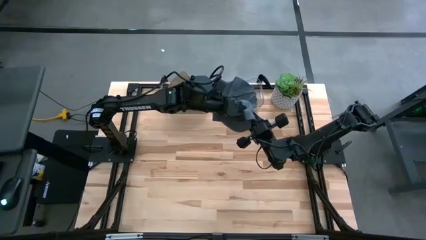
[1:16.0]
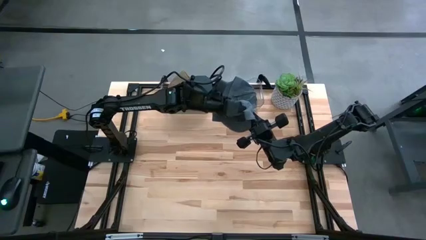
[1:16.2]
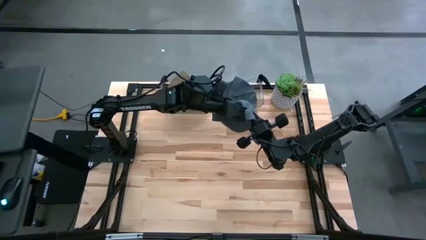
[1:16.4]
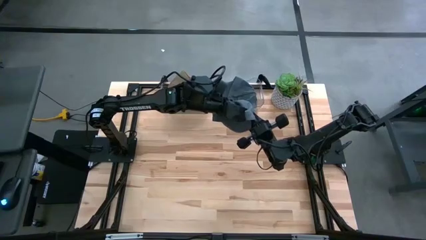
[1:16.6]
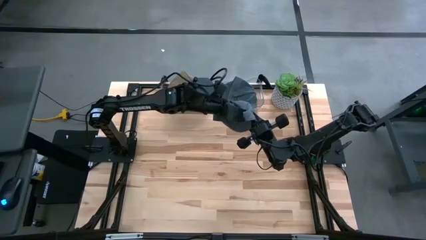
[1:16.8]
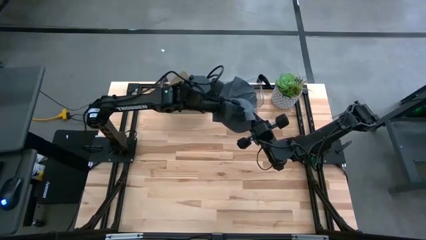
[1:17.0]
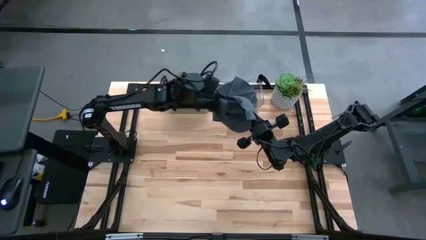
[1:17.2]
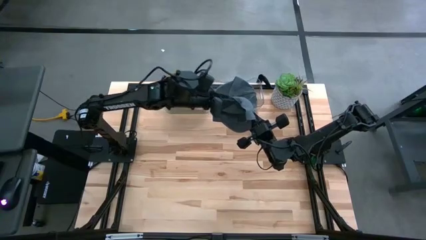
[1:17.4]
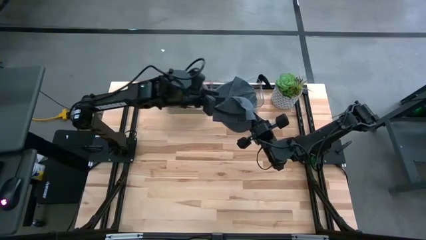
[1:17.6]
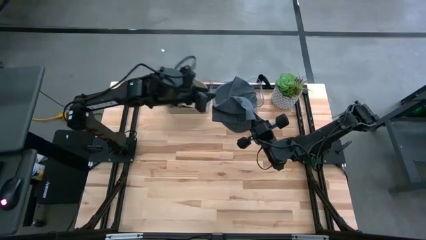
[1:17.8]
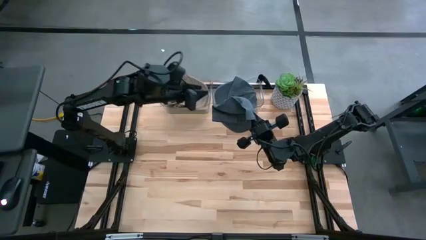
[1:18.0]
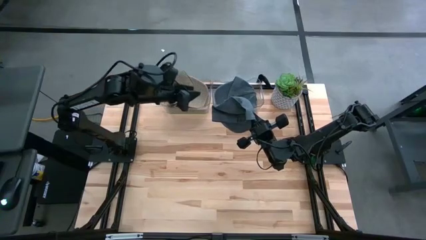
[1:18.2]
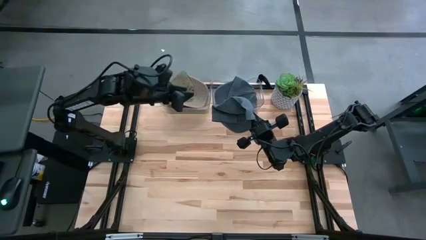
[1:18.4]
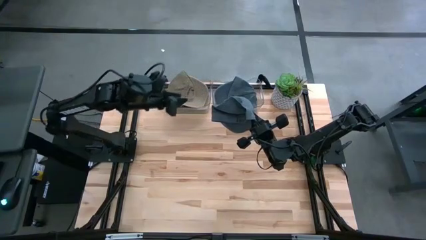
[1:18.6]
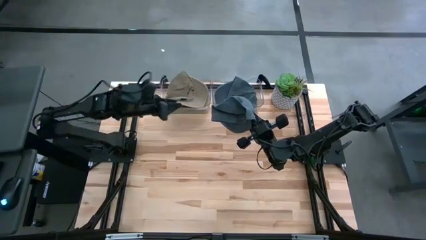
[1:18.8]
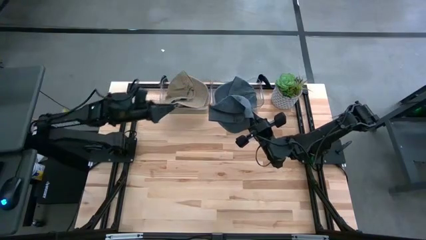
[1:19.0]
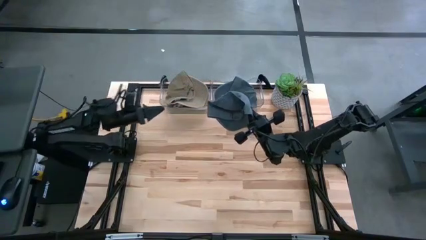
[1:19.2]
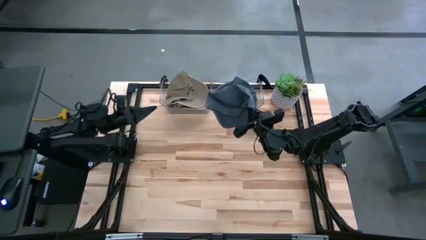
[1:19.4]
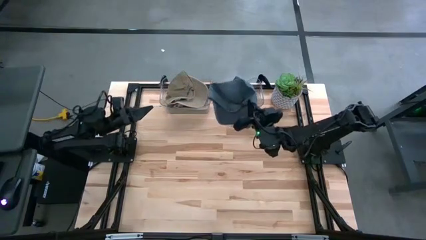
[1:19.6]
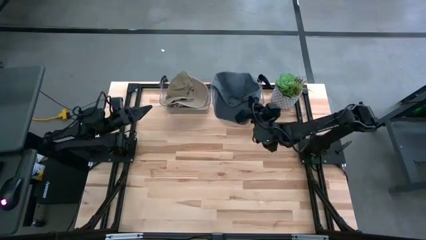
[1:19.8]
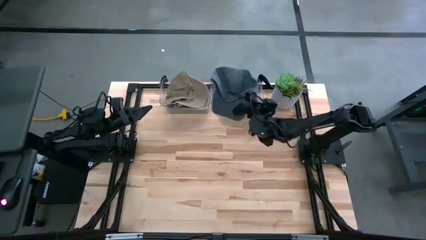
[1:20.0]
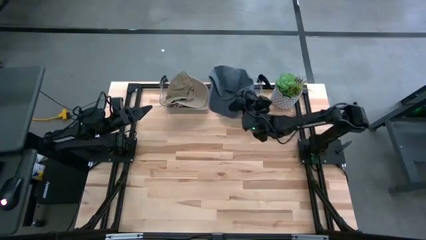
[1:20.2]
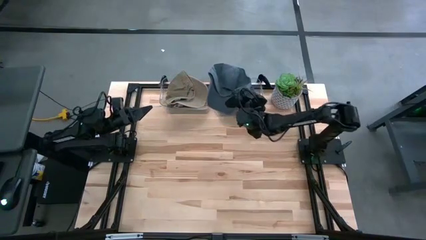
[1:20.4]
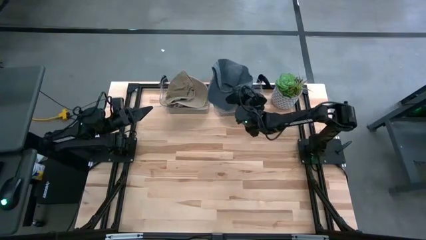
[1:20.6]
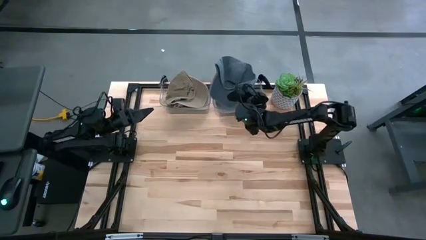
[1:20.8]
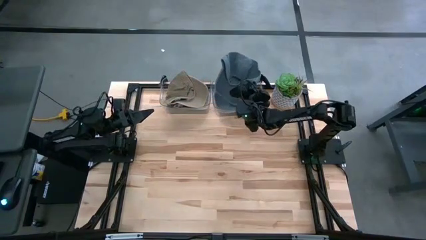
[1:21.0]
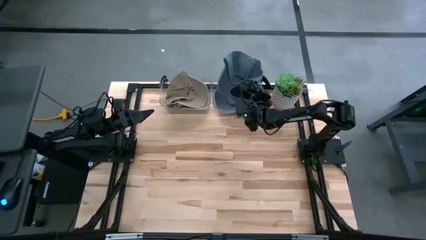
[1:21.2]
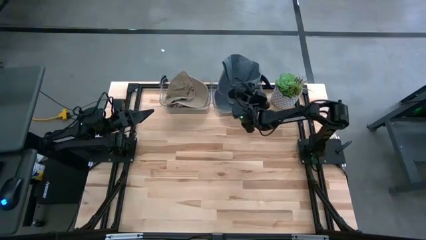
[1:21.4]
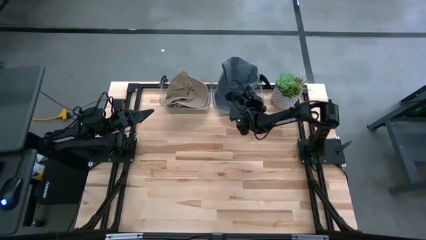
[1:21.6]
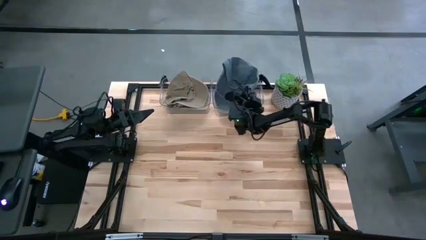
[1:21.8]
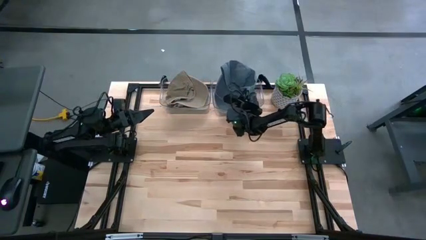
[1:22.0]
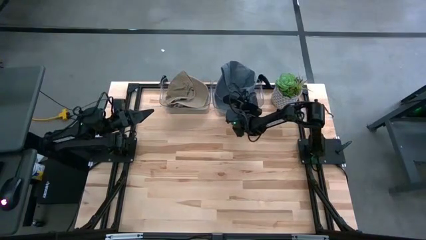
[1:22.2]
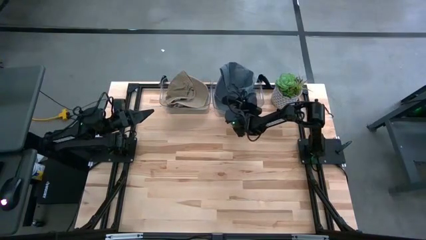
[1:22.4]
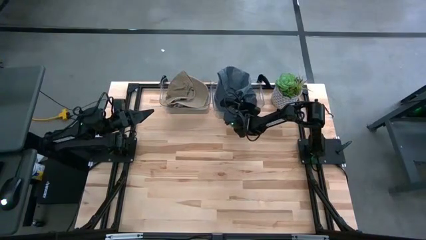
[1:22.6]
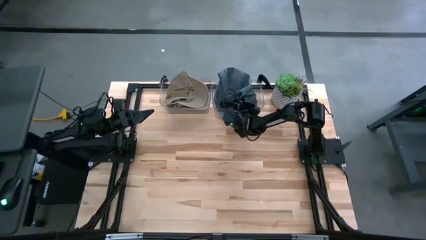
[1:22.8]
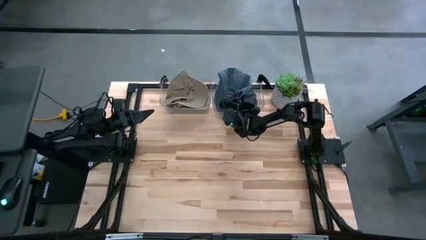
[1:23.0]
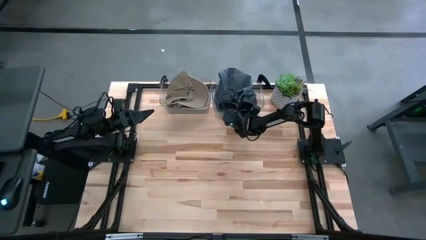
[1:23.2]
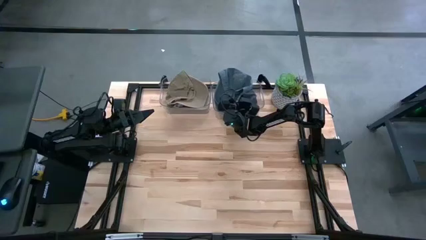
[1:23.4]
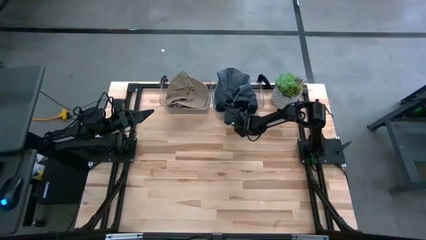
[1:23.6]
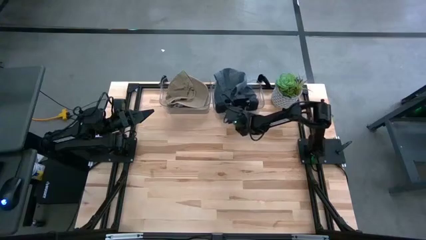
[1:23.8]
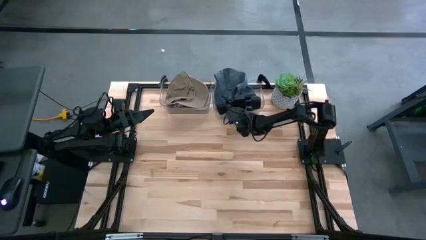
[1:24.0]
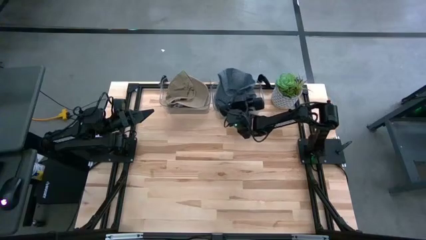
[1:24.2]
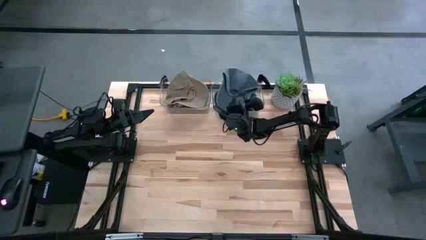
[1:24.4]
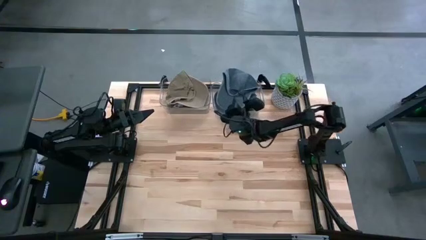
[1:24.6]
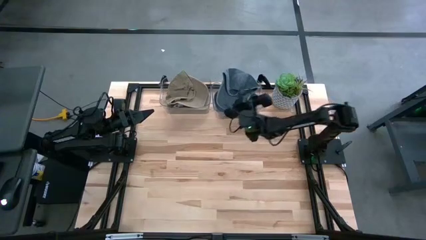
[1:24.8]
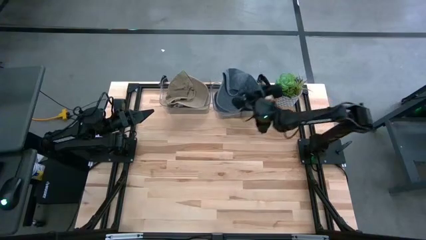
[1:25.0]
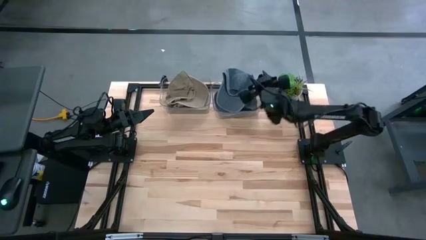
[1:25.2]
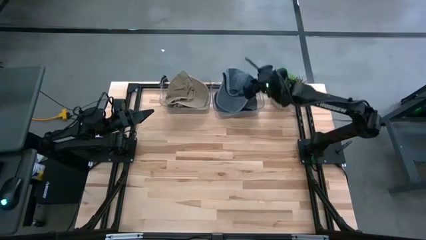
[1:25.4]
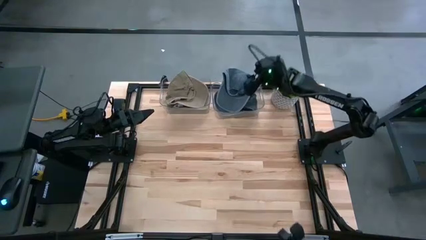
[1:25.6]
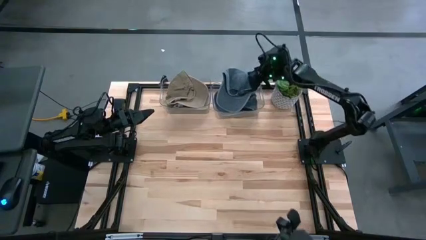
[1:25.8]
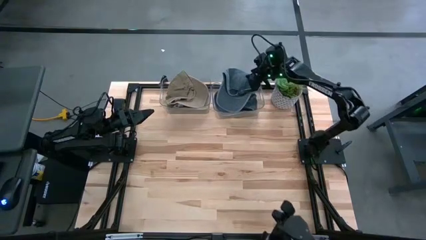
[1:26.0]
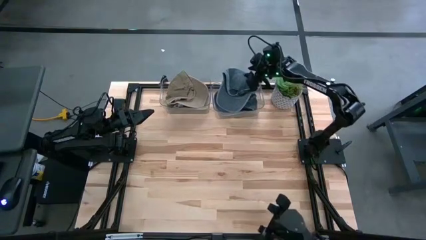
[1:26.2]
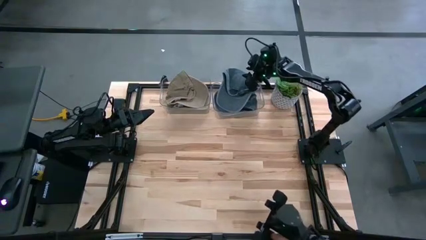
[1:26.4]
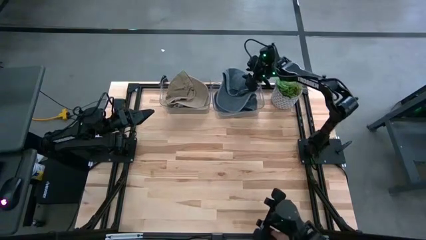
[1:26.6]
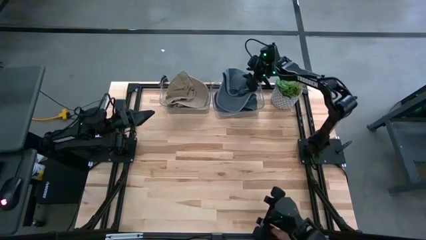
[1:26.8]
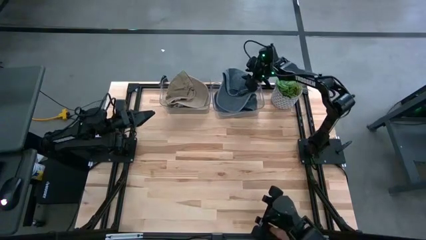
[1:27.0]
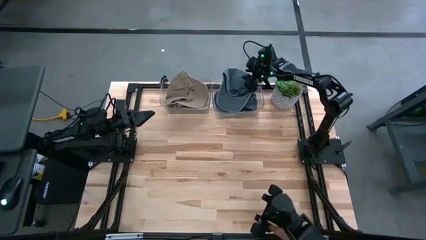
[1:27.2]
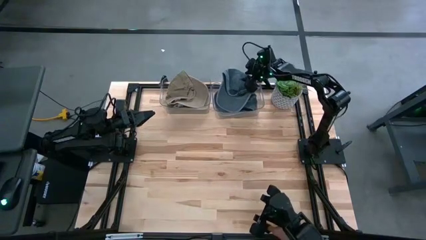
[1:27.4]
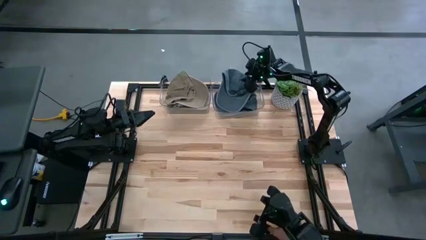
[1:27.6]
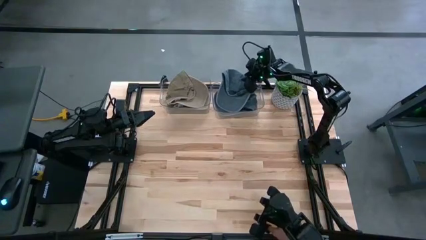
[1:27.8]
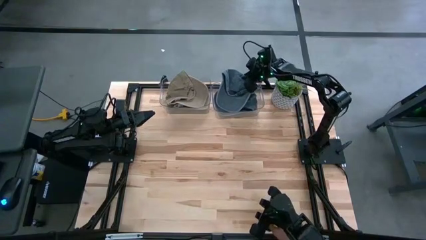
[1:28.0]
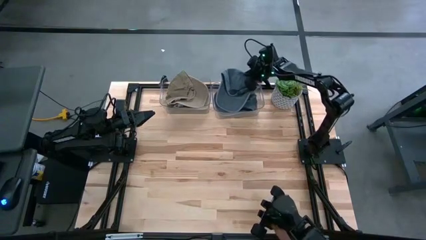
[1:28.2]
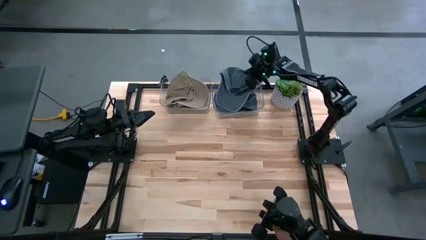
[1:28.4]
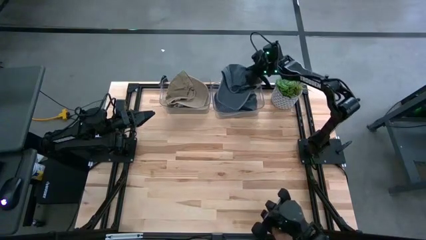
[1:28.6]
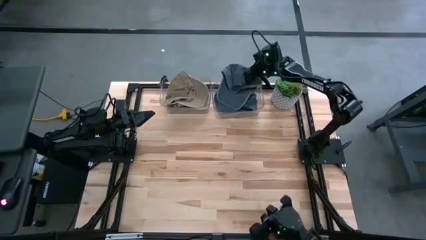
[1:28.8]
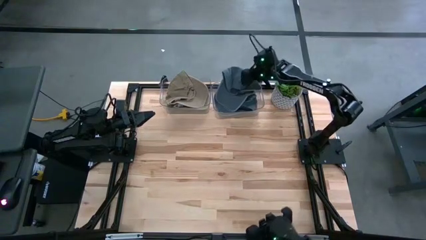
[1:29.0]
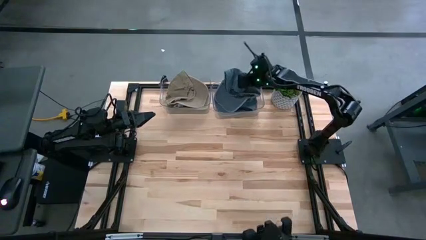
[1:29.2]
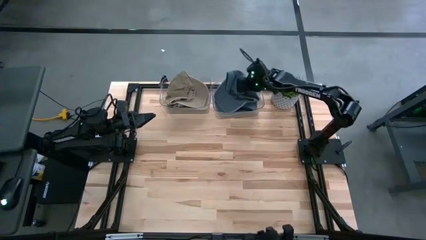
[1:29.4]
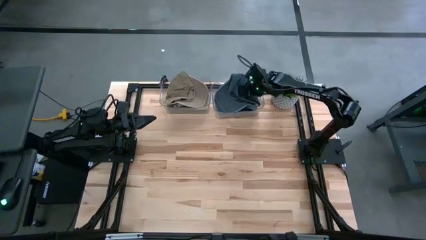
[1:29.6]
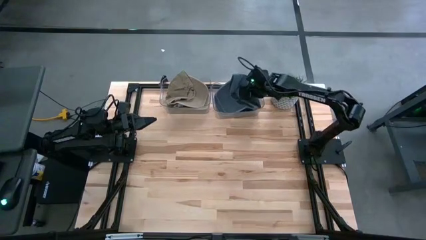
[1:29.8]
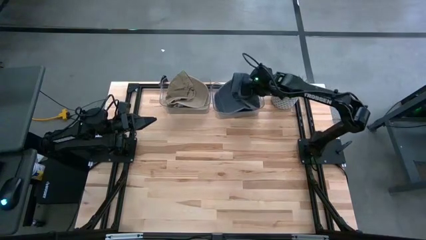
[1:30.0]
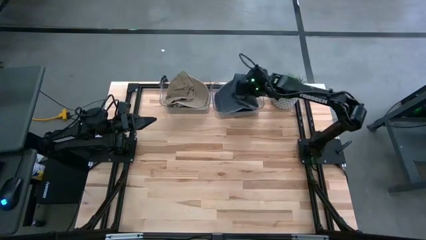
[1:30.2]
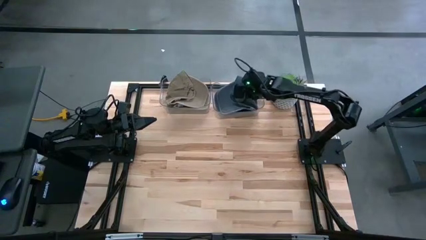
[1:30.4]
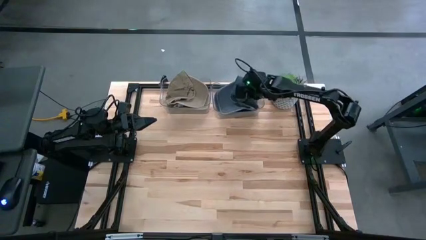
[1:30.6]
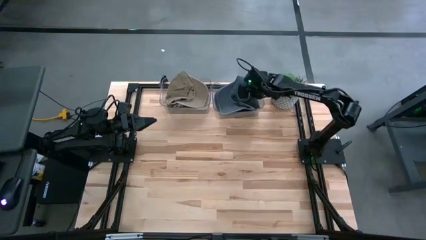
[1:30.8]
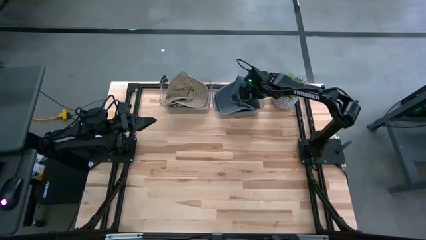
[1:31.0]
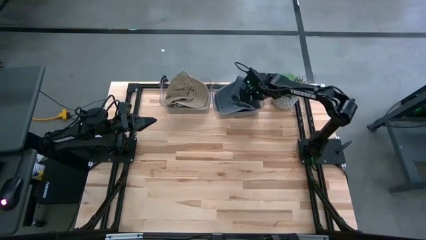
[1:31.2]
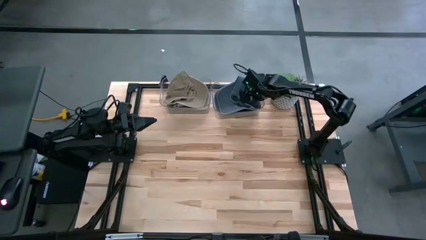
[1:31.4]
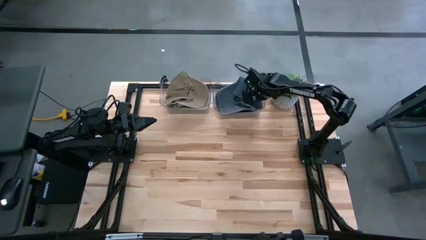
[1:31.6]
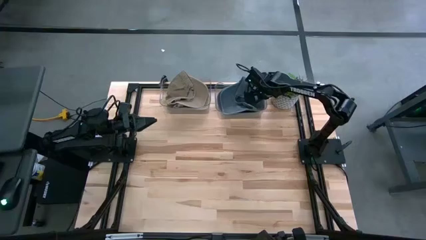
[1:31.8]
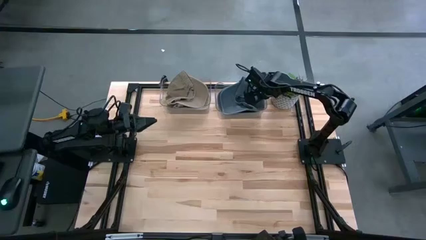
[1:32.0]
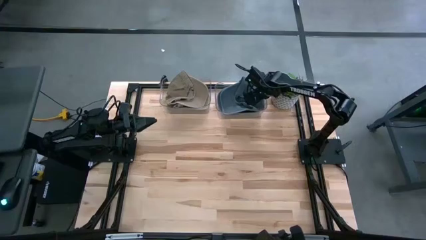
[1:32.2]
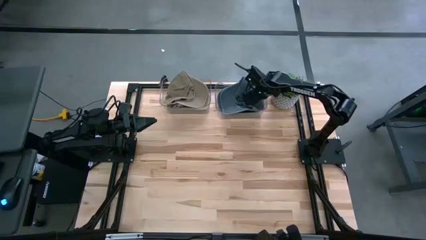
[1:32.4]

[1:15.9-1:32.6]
Task: Pick & Place hat
Put the blue cap into the right transparent bin
